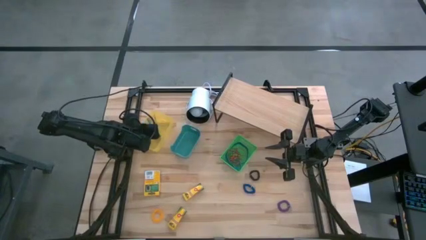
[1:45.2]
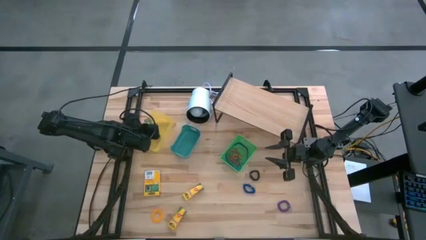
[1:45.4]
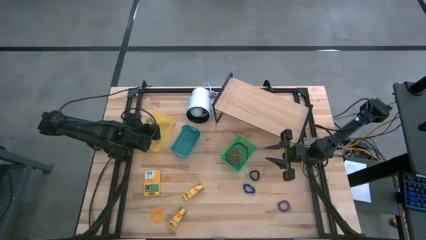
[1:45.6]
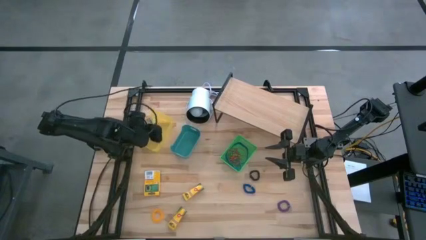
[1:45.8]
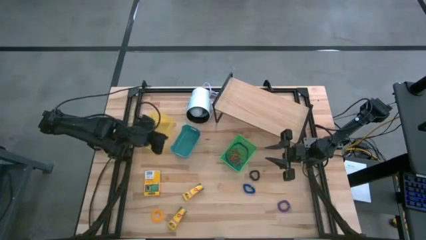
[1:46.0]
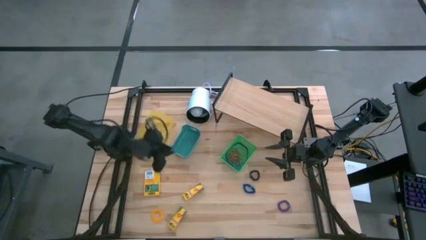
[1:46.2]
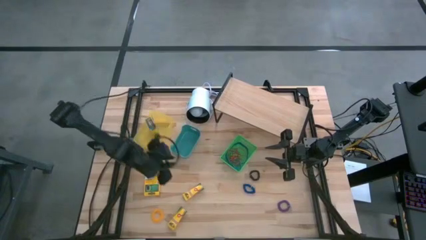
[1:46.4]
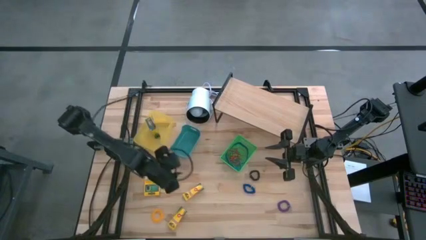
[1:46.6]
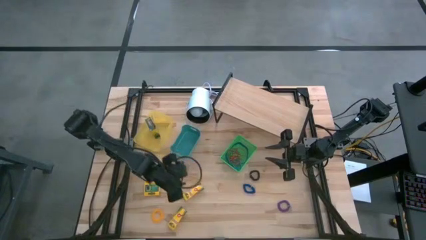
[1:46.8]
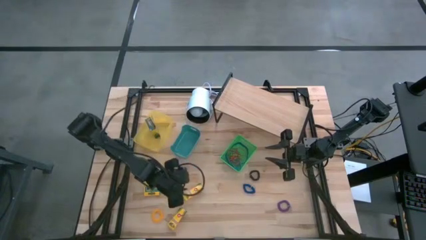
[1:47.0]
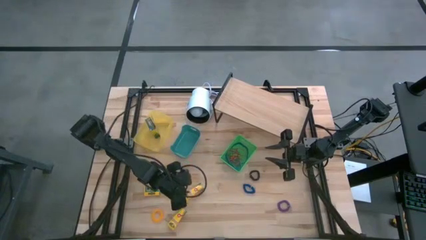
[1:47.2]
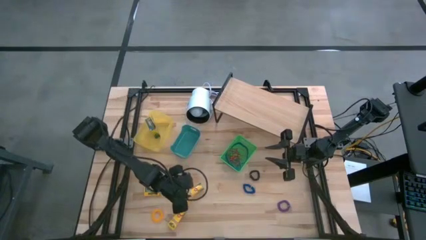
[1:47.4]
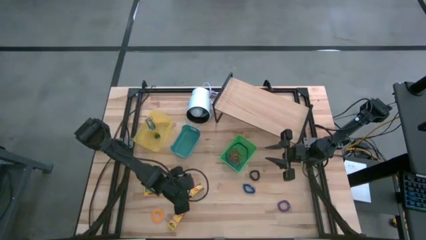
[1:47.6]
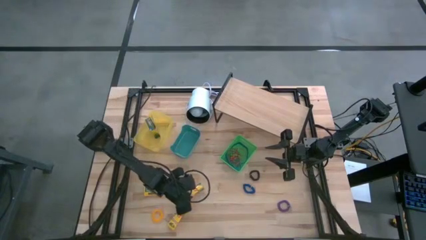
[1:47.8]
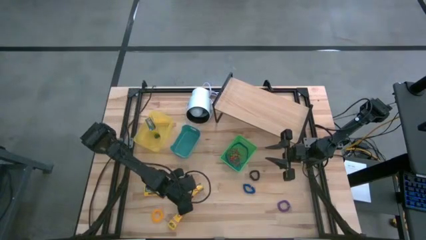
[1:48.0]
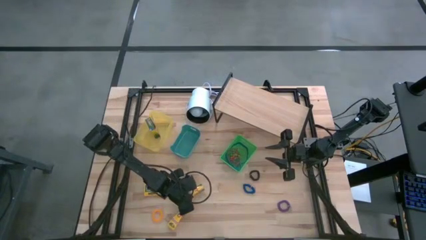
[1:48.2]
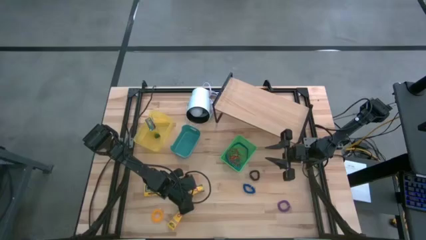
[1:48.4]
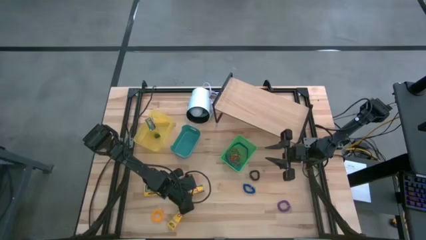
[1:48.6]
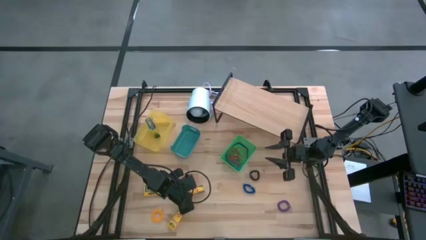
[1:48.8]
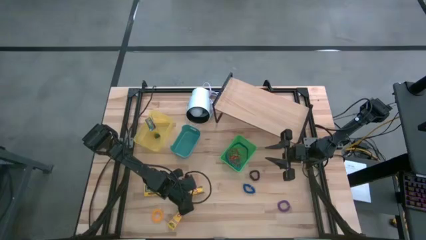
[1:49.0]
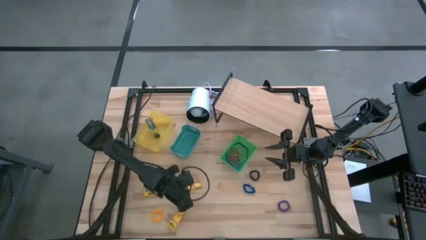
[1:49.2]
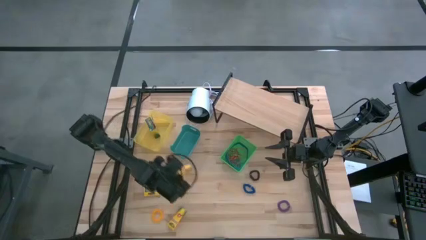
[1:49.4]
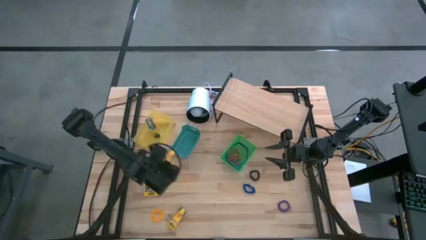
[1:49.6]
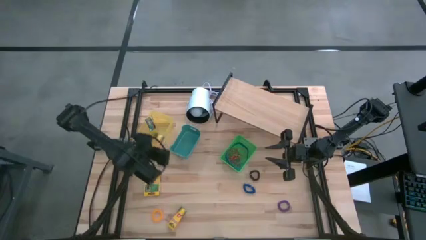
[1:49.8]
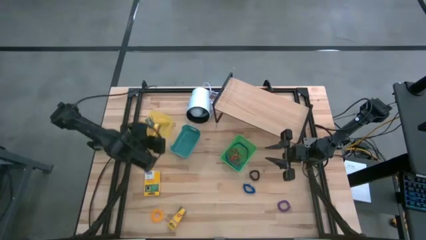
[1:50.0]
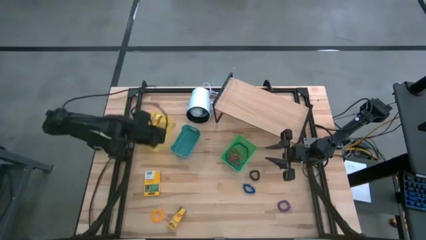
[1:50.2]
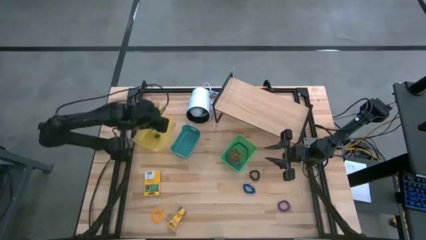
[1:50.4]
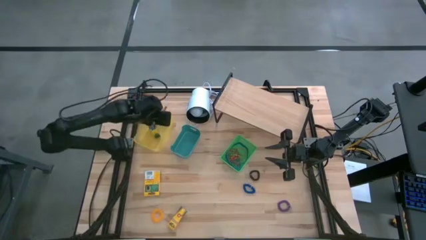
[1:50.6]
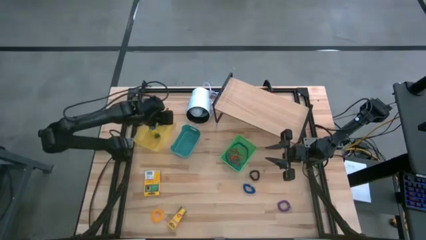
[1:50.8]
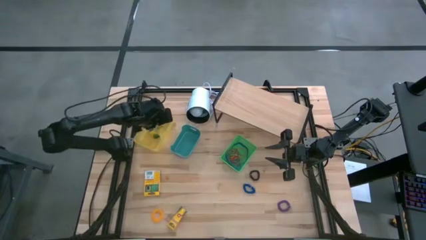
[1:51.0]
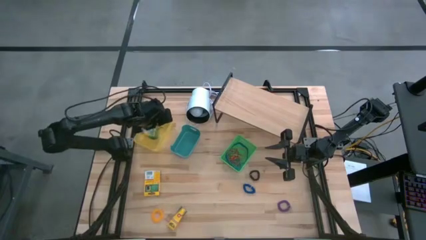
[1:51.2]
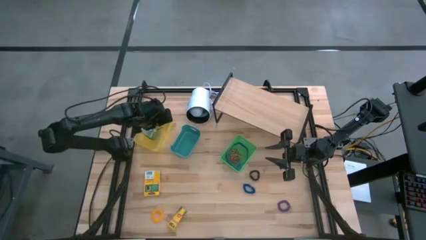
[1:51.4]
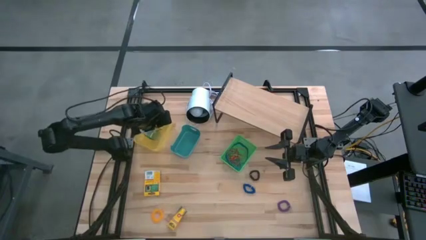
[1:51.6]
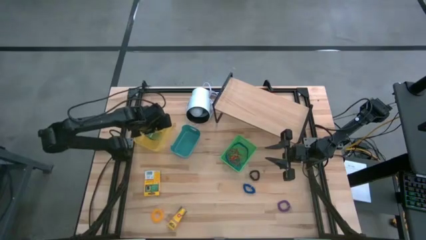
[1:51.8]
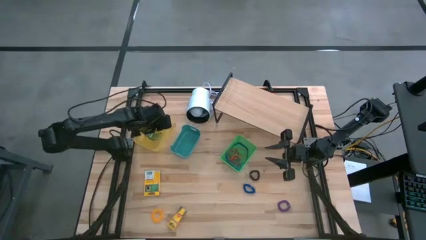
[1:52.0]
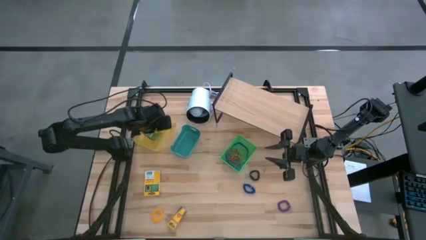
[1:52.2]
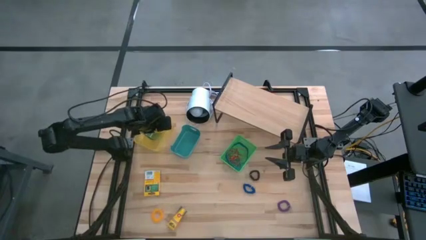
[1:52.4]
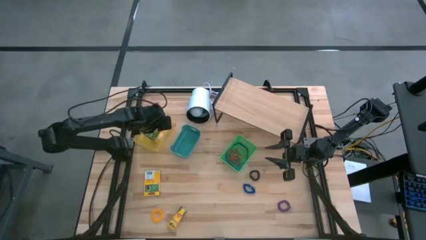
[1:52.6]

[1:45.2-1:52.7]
Task: Pick & Place Office Desk Supplies
Put the top small yellow crayon box into the yellow bin

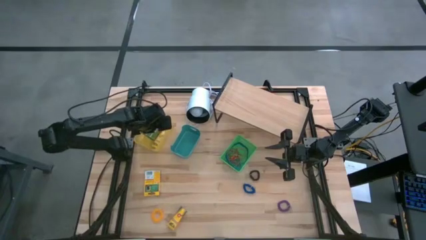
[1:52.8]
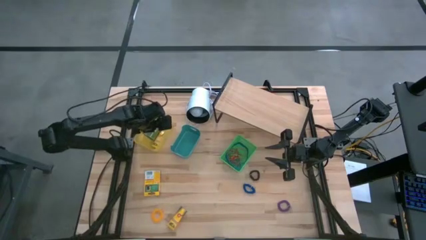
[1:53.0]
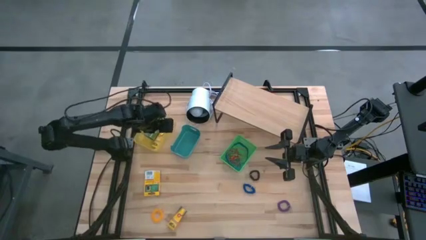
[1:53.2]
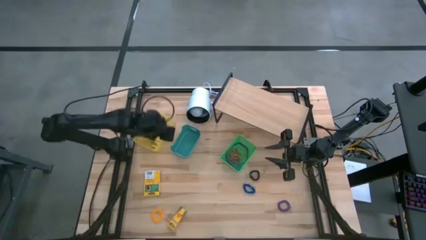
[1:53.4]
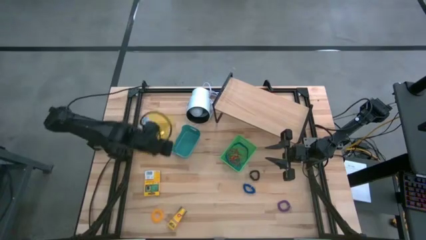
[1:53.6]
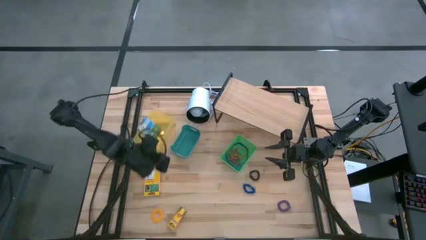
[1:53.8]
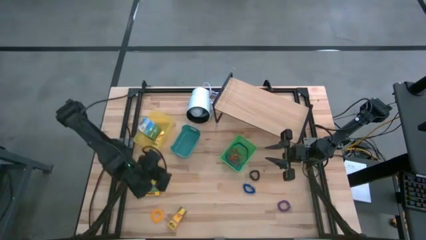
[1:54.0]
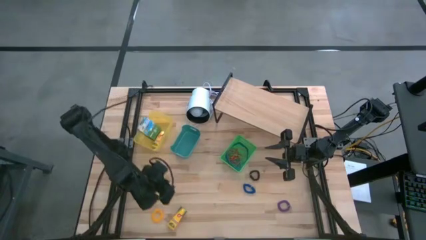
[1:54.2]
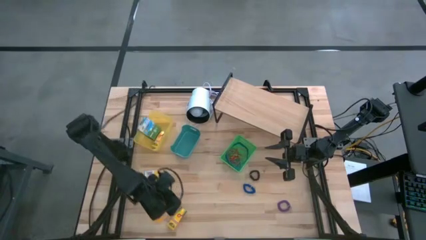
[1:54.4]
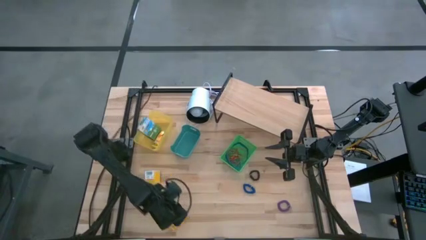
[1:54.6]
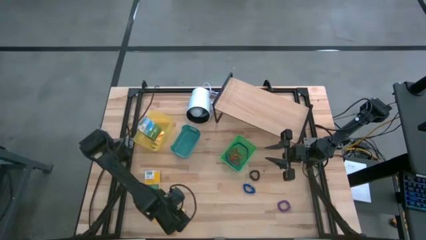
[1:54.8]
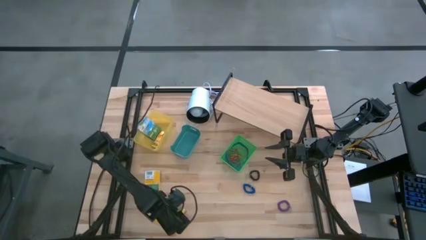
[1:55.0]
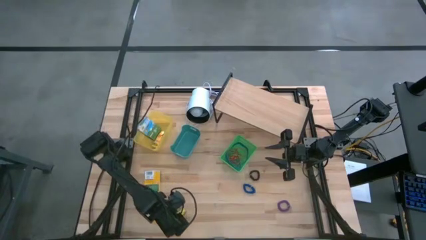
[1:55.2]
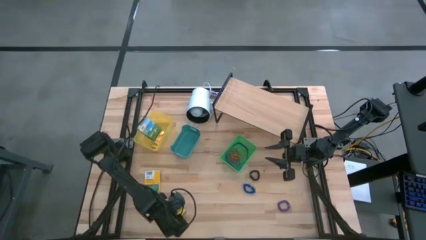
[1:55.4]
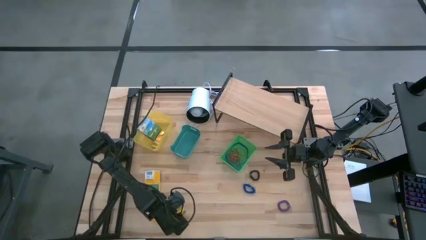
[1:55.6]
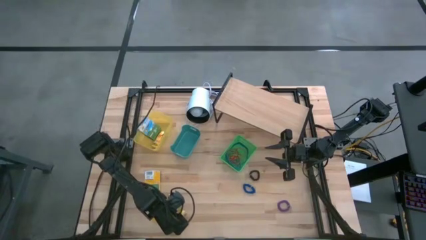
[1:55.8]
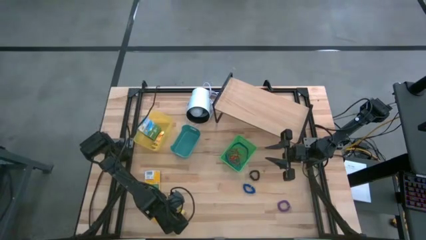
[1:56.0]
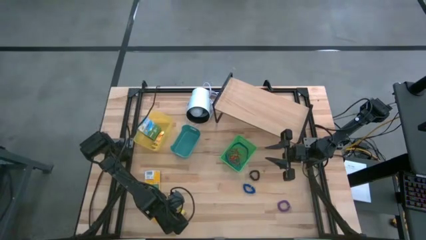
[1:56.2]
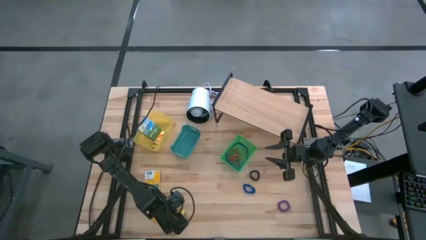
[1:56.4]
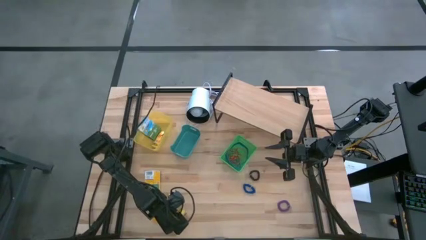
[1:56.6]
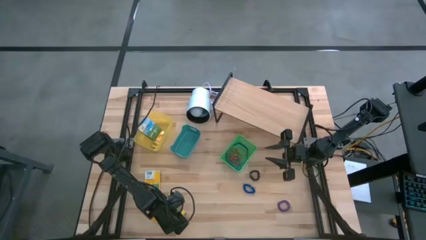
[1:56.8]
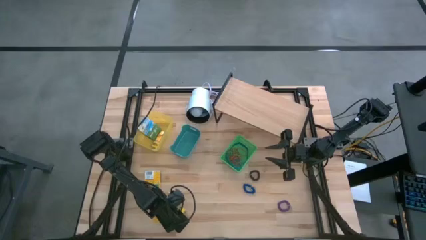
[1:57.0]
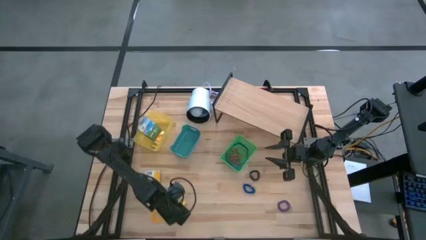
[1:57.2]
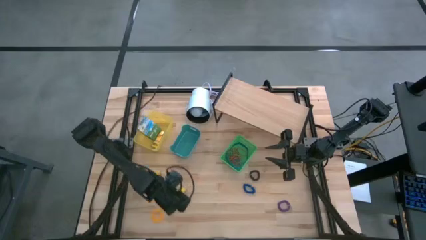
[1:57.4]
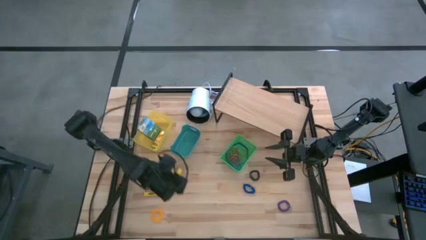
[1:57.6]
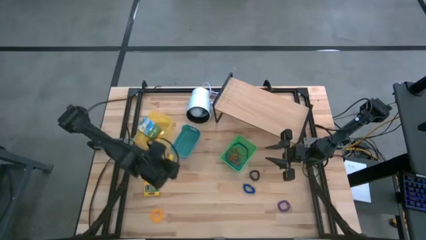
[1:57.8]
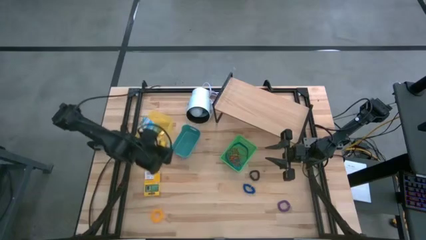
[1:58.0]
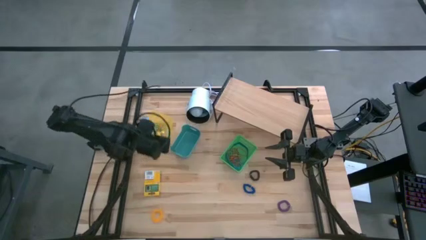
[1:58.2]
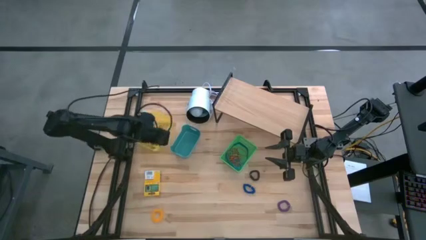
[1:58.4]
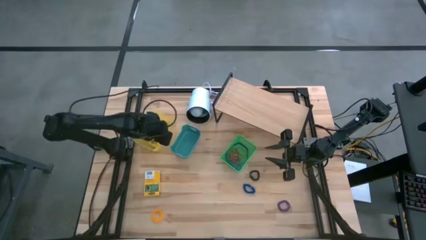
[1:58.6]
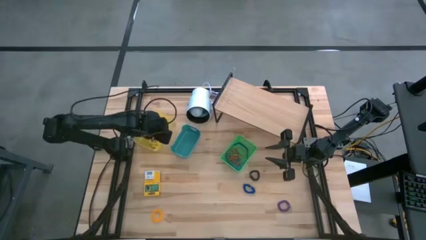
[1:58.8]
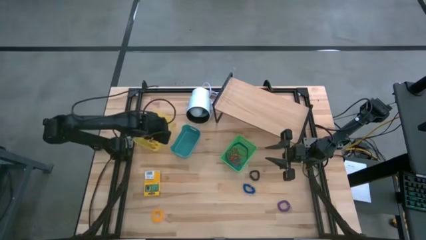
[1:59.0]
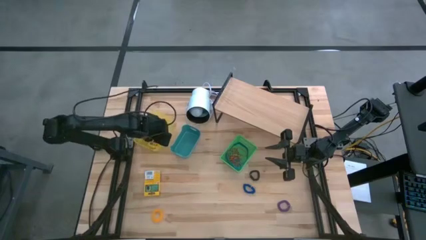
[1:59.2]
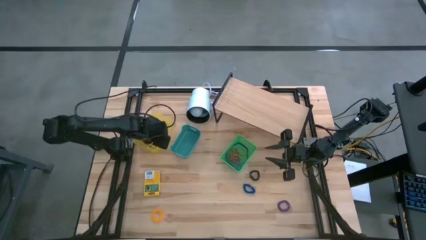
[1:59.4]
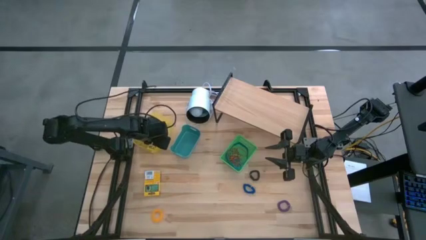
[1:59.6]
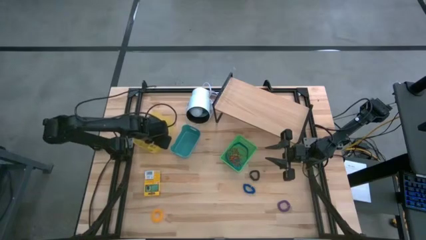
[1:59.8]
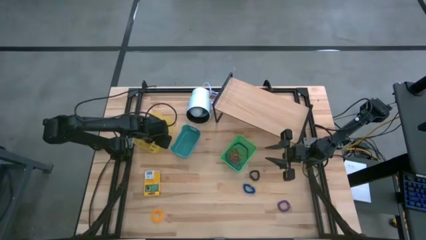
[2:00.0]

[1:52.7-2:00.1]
Put the bottom small yellow crayon box into the yellow bin
